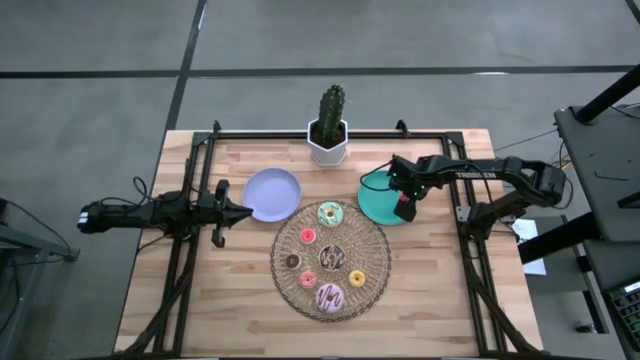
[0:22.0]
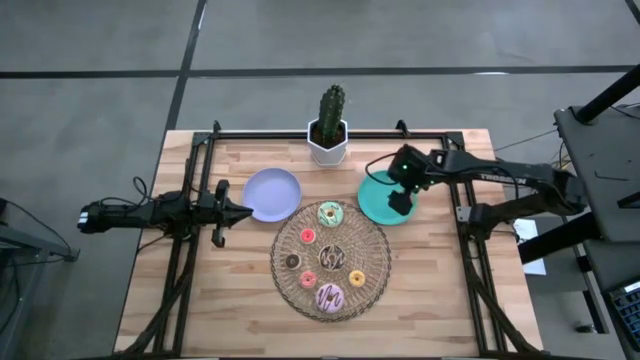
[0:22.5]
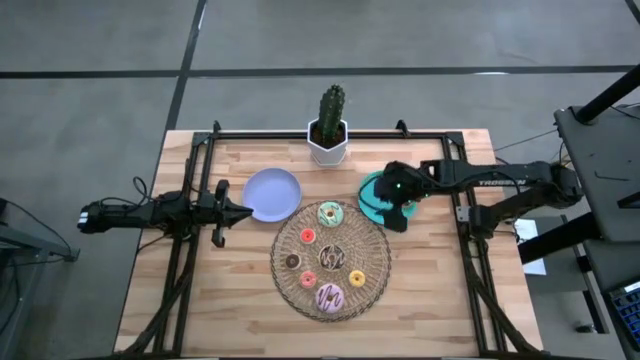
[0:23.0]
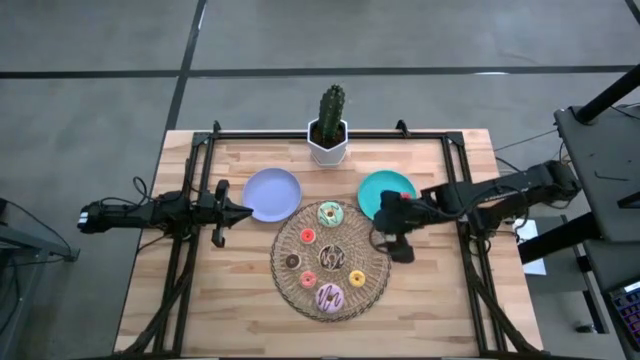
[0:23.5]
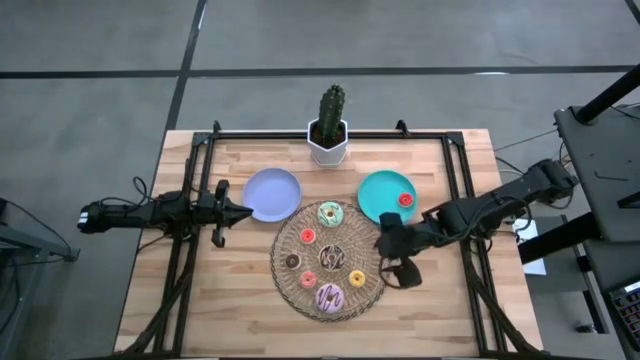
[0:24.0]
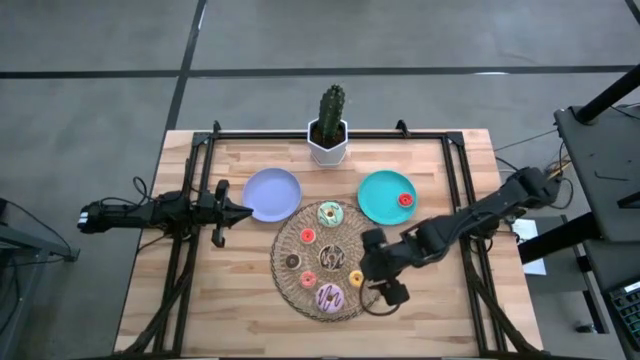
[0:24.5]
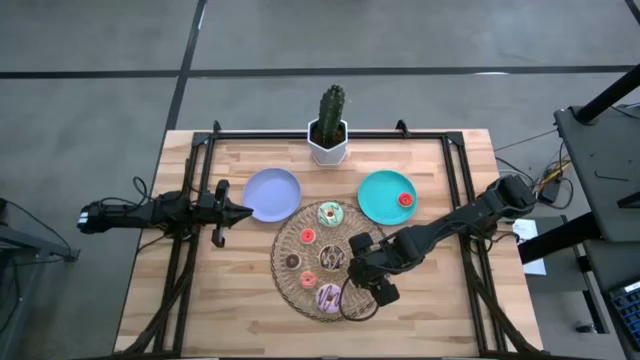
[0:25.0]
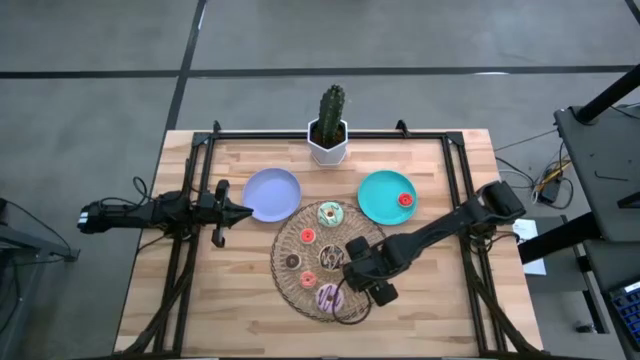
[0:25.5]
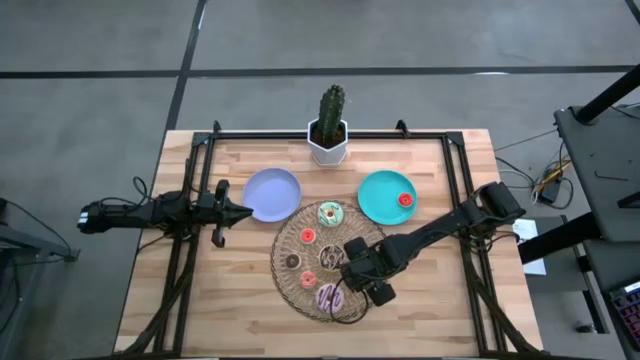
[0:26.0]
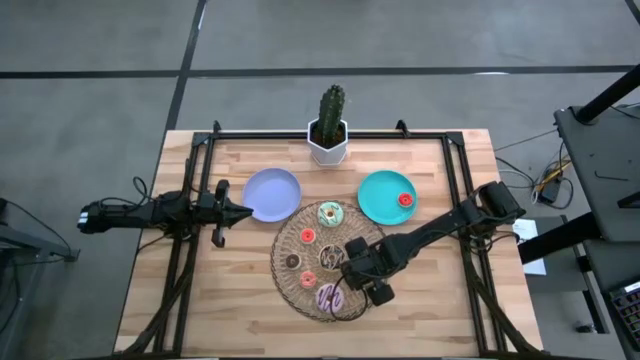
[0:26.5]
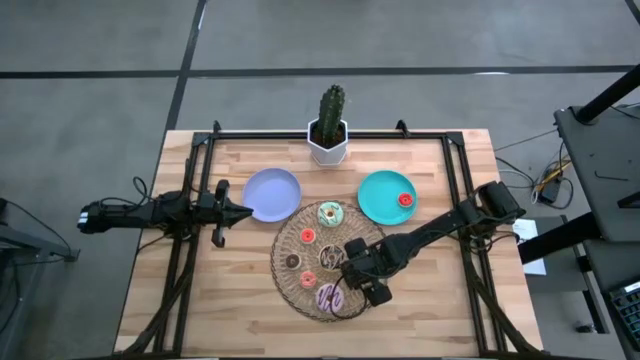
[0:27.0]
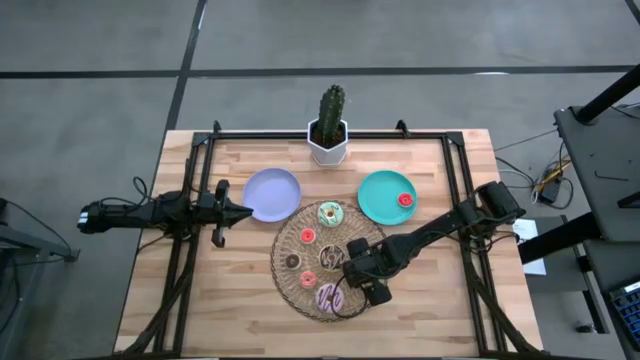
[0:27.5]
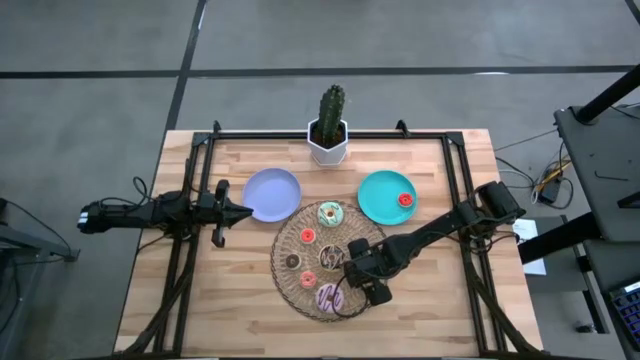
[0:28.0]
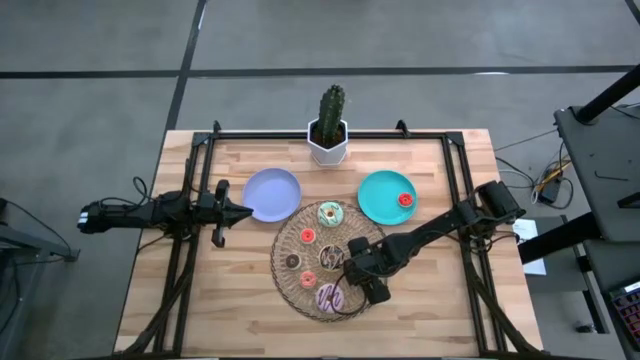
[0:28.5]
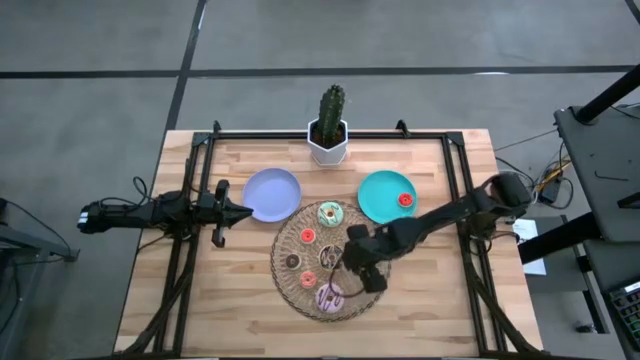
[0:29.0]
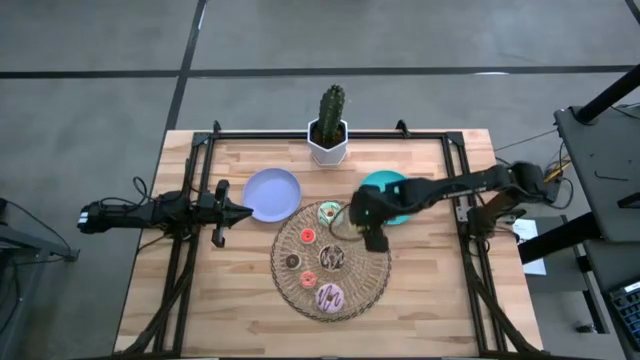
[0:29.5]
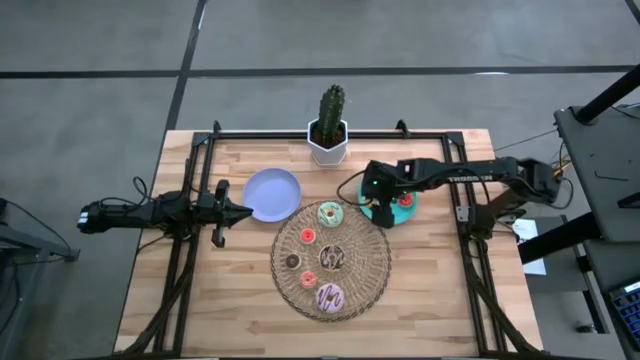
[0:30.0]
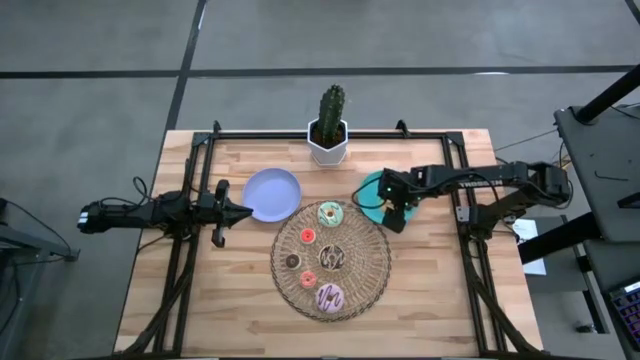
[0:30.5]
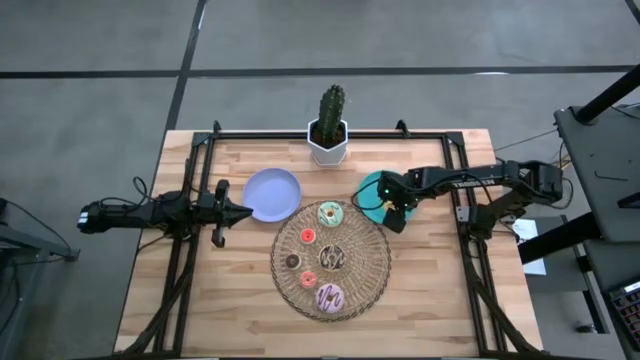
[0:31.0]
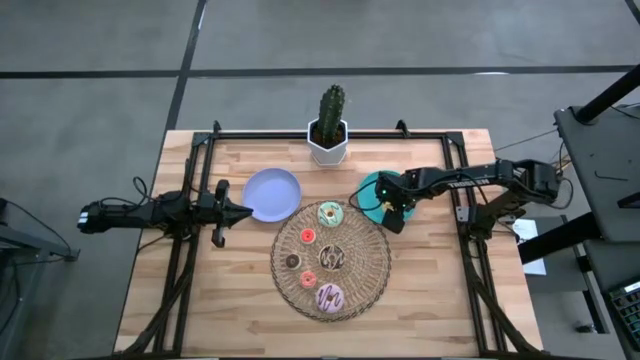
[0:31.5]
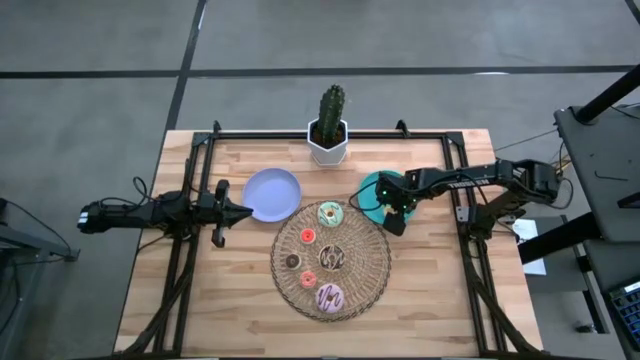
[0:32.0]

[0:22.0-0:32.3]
Task: Pick & Place donuts
Put the small yellow donut on the blue plate

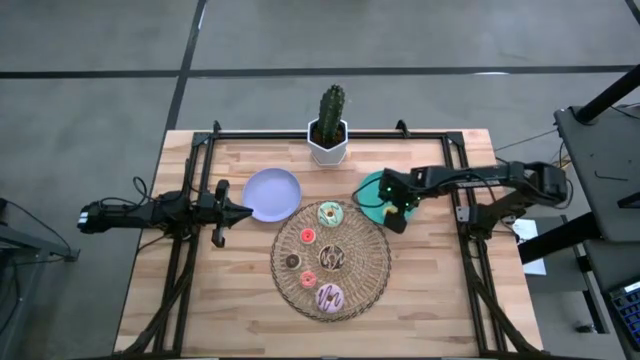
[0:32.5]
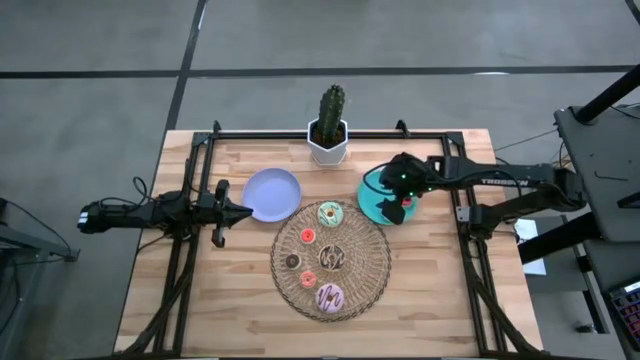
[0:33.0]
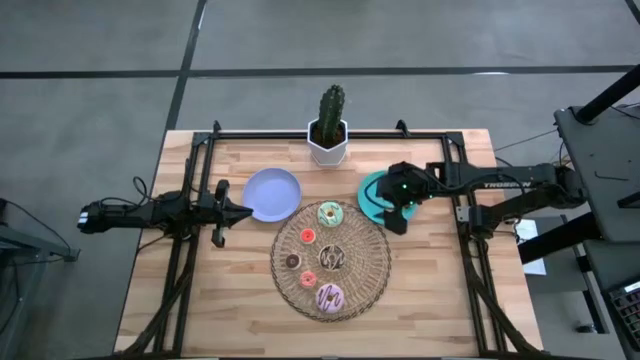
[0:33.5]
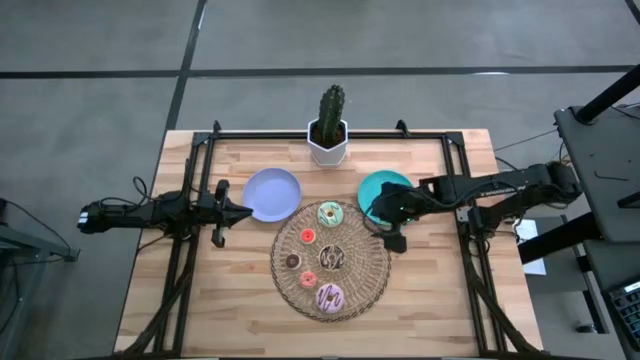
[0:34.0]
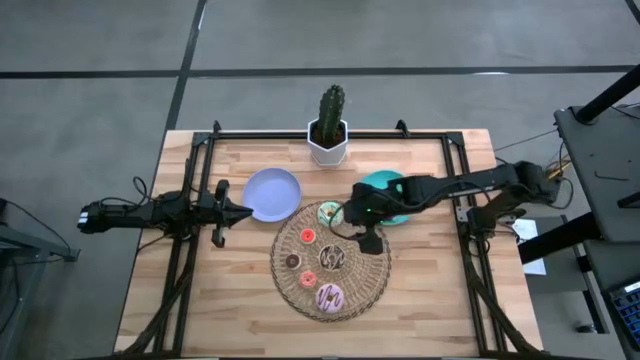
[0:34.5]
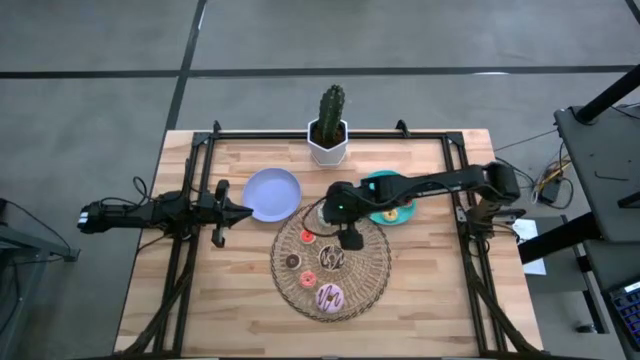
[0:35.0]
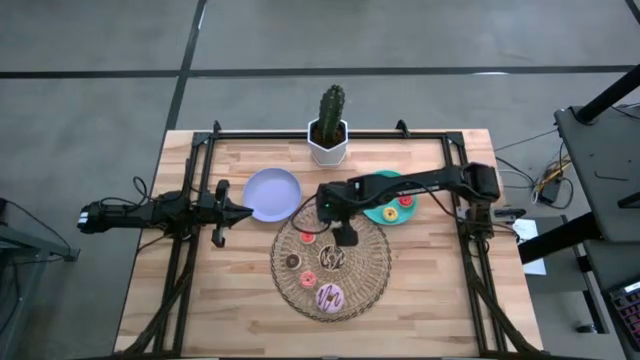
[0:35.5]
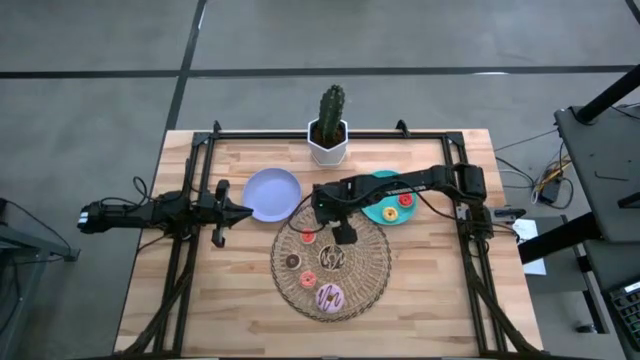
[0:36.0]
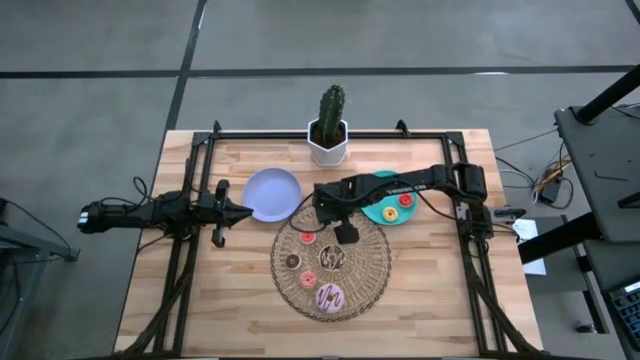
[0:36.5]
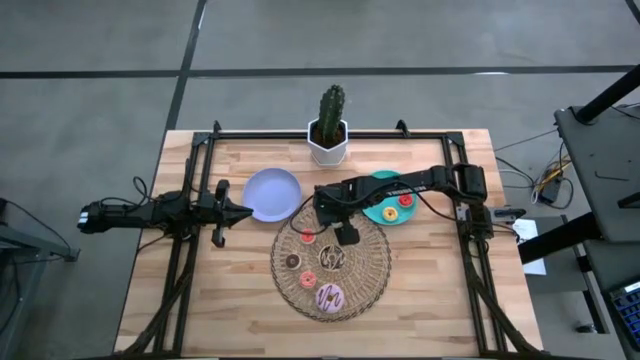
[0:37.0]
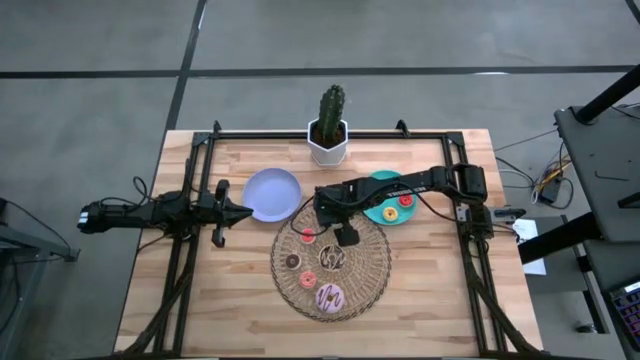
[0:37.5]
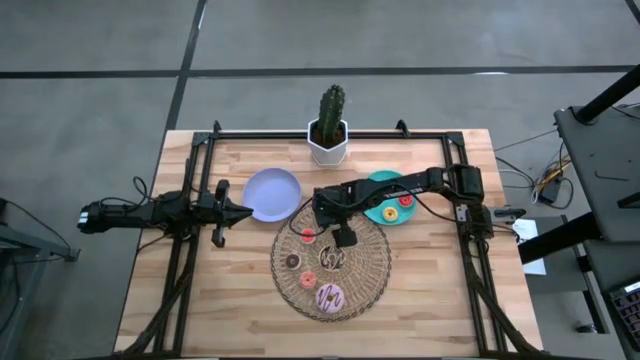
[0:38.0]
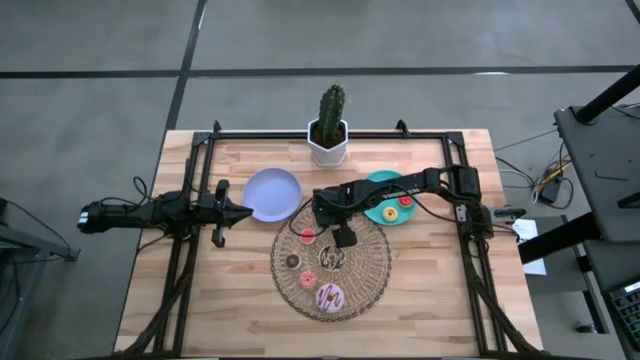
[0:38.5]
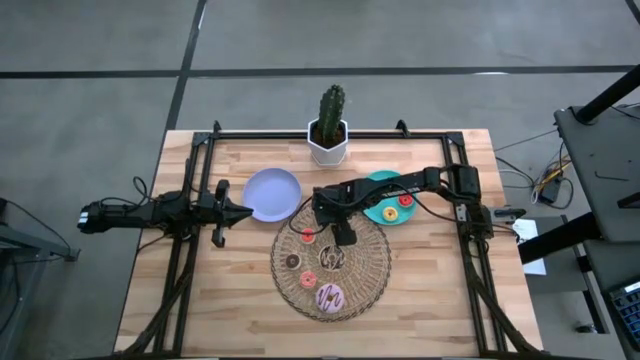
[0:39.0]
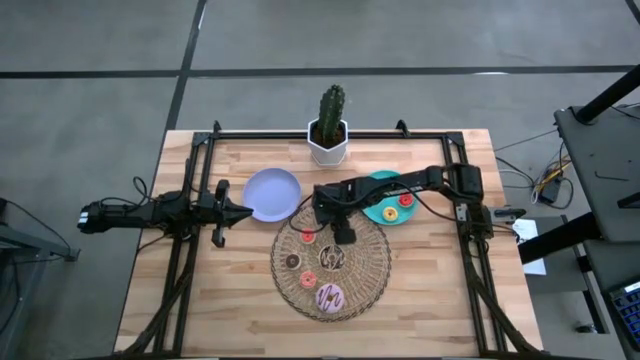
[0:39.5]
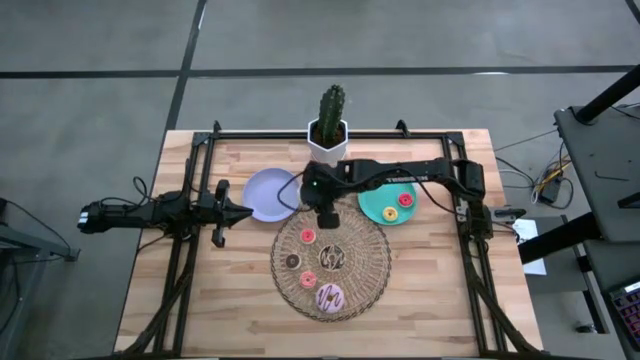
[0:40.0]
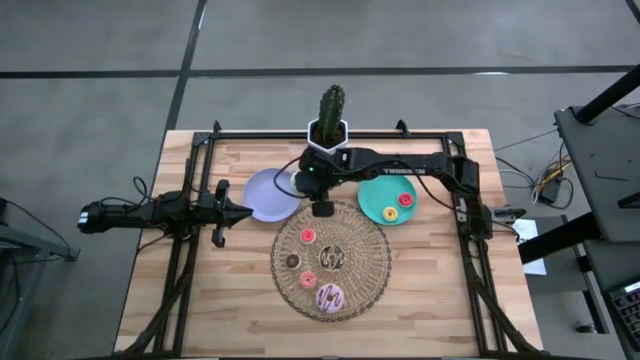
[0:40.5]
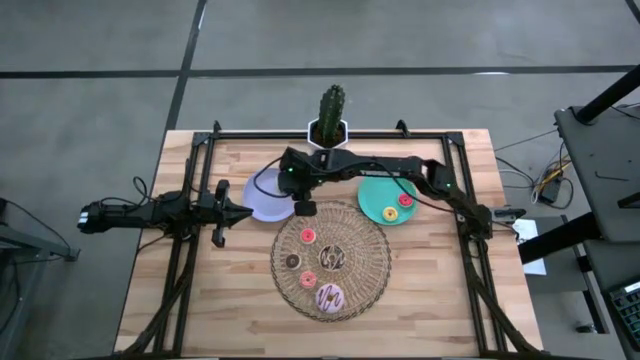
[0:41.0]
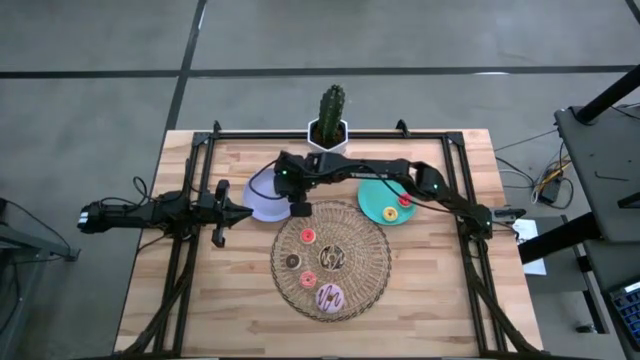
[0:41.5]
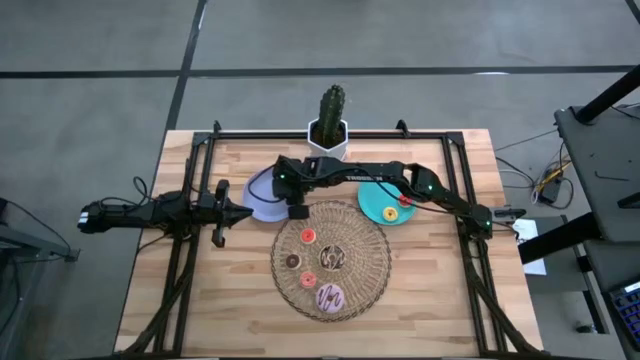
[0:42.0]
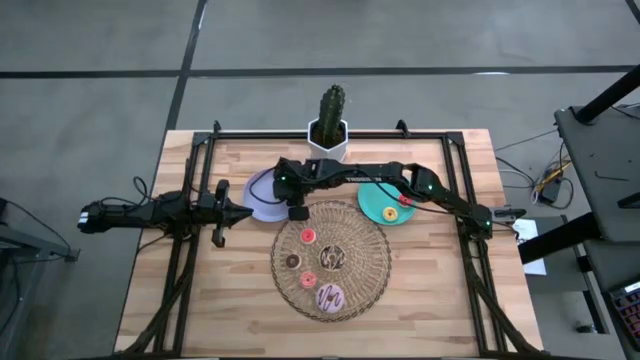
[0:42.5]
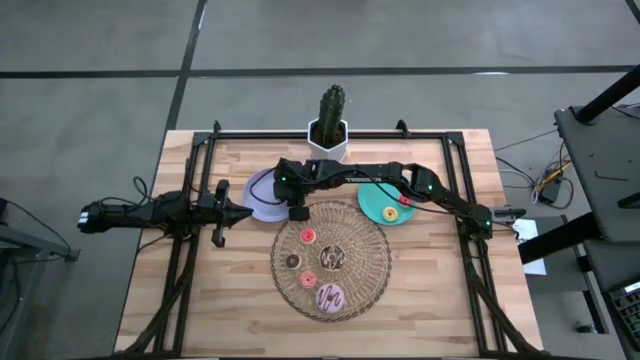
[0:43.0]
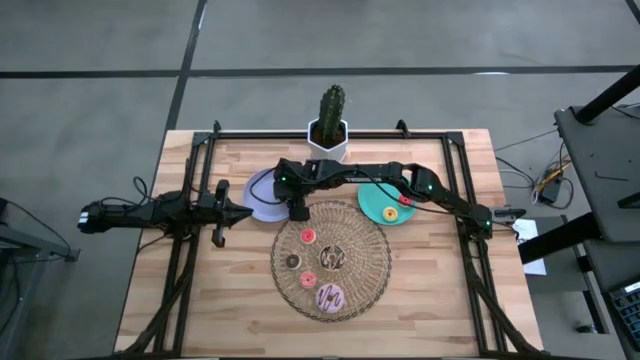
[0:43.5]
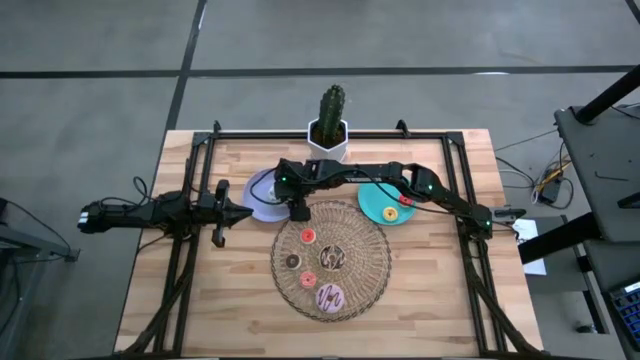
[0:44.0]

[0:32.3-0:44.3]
Put the large blue donut on the purple plate
